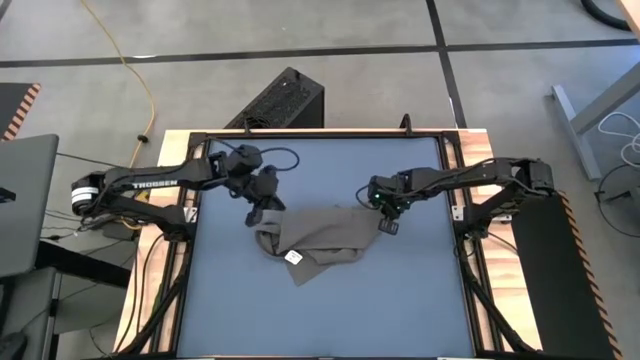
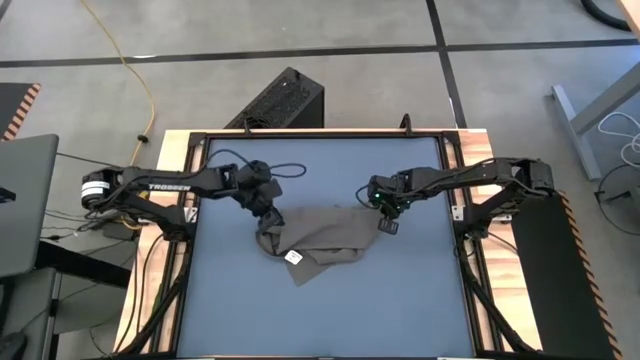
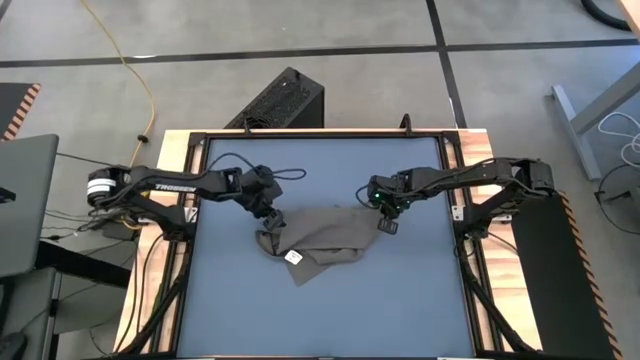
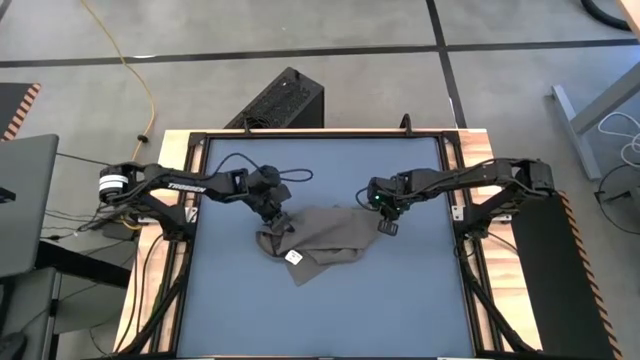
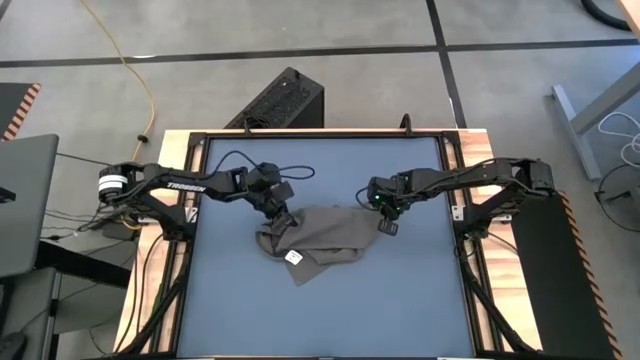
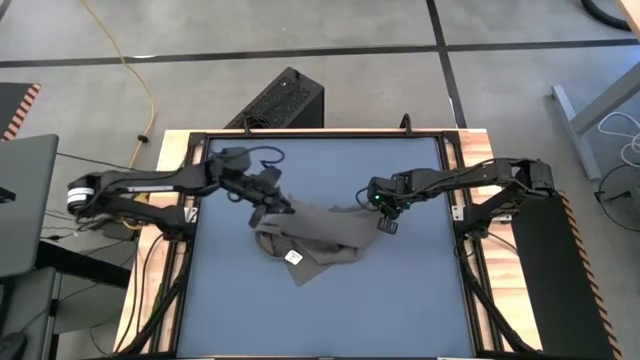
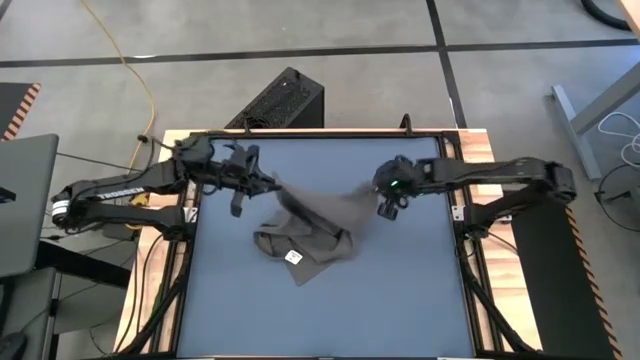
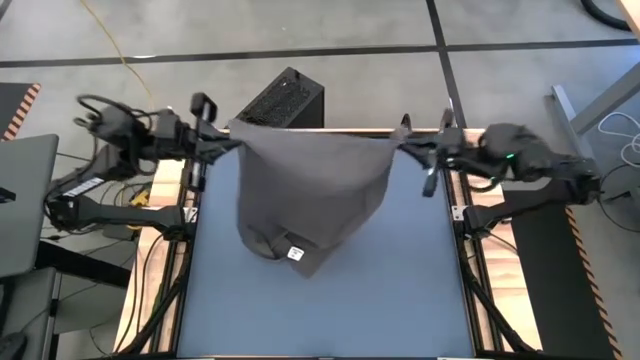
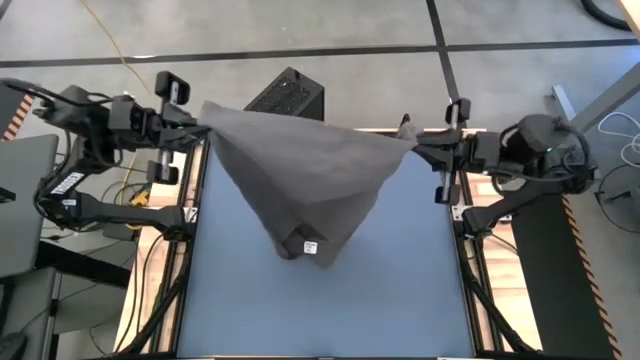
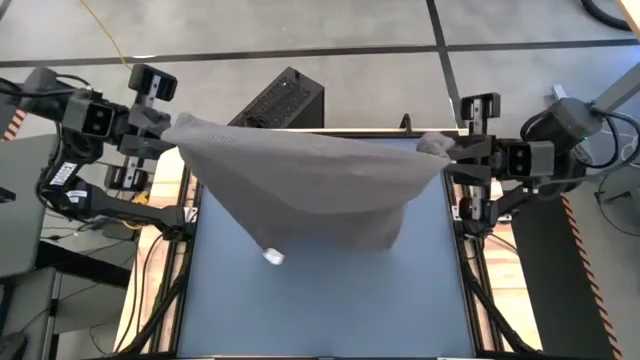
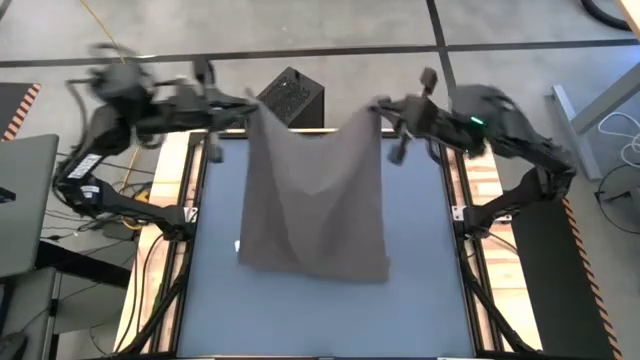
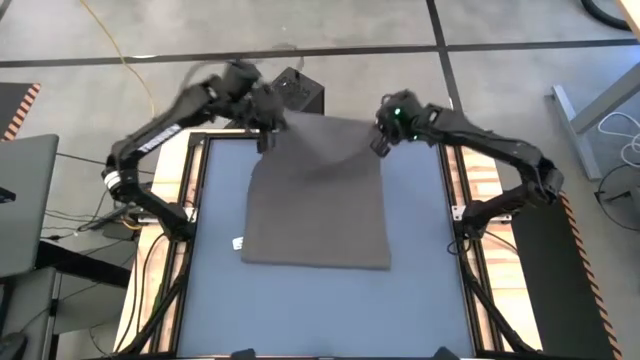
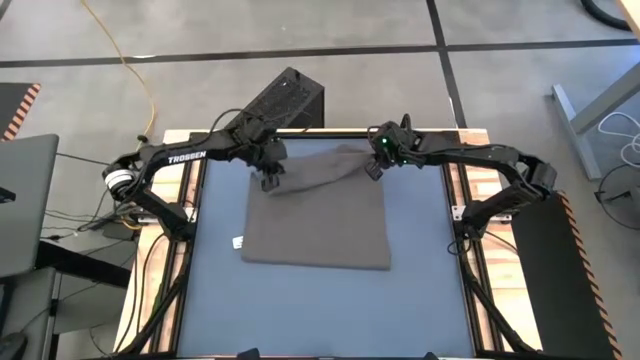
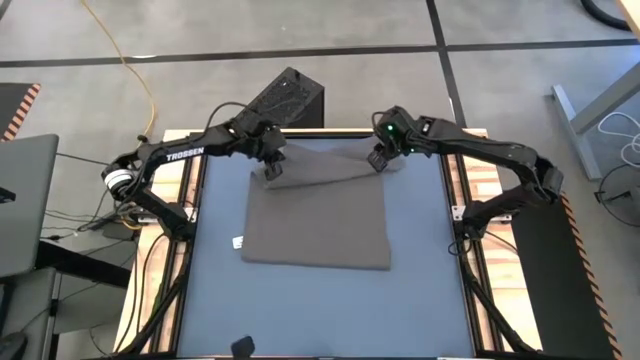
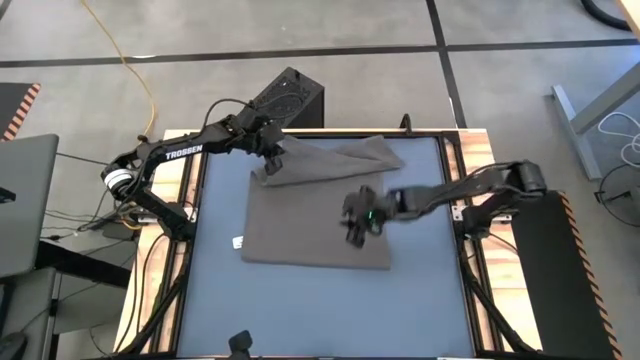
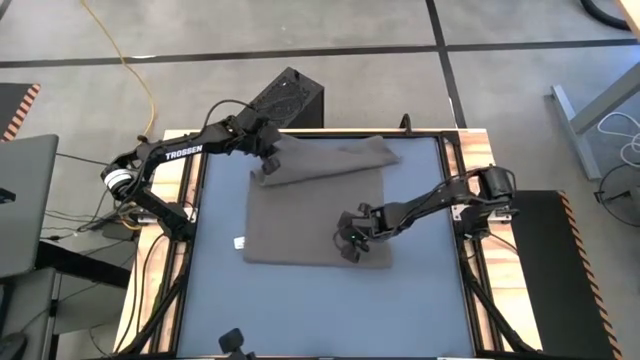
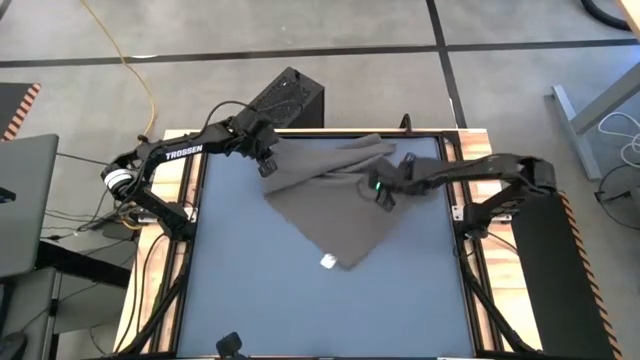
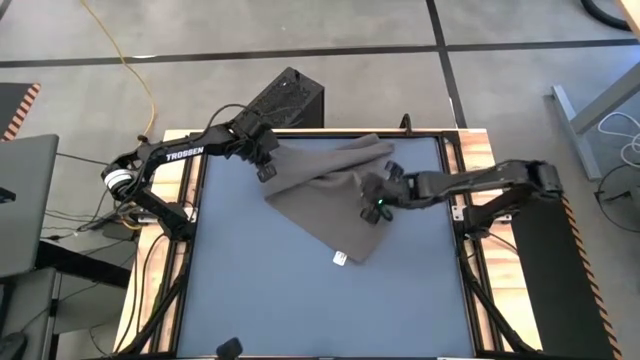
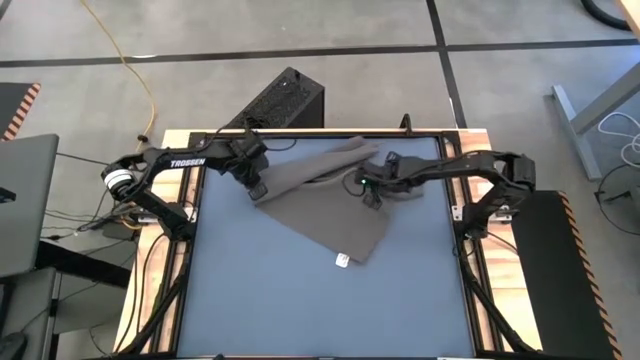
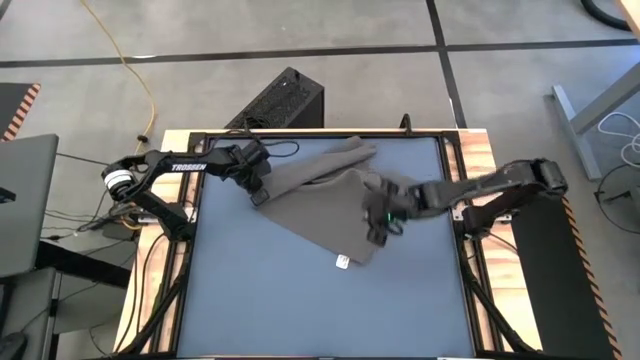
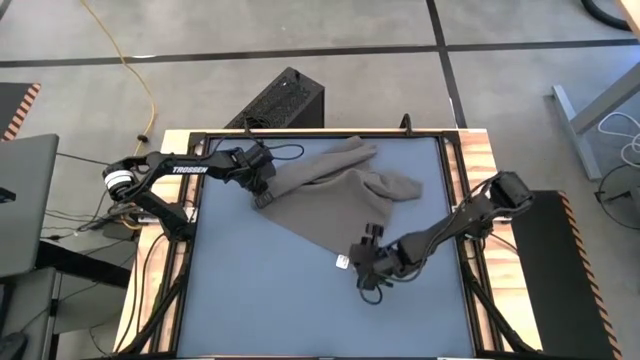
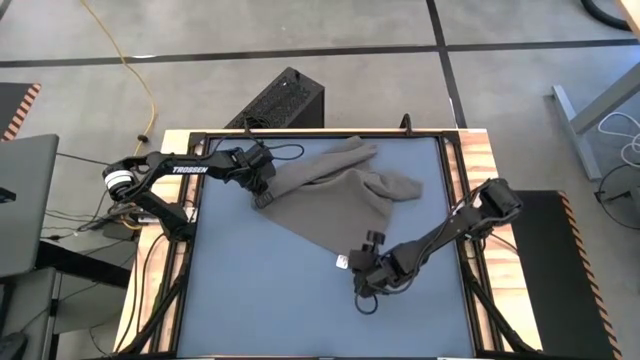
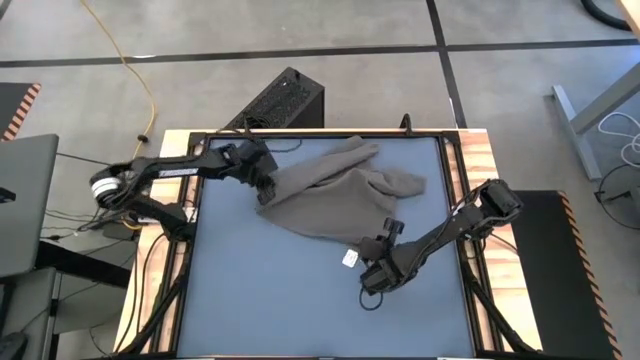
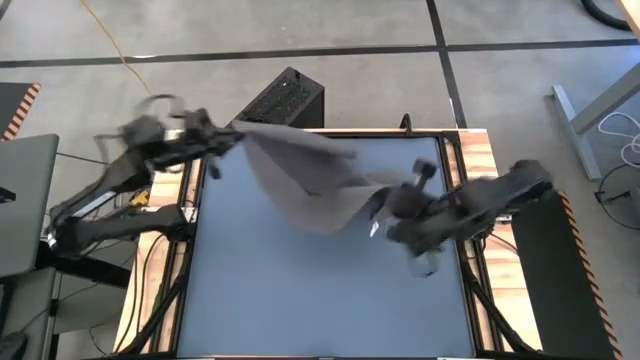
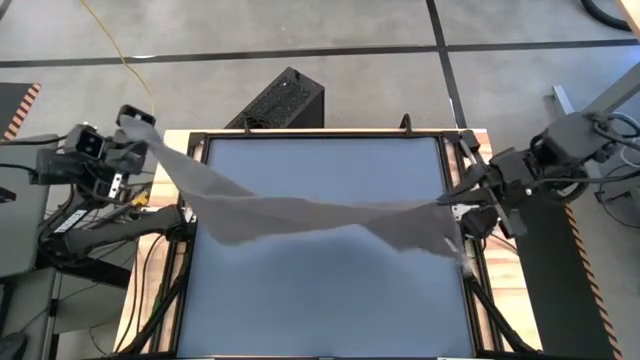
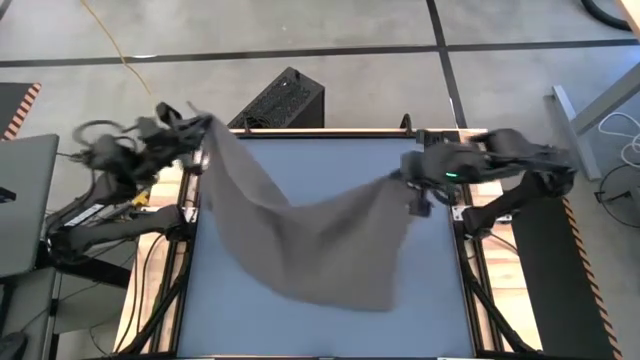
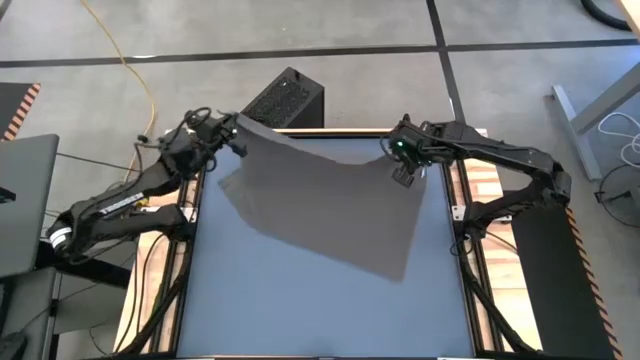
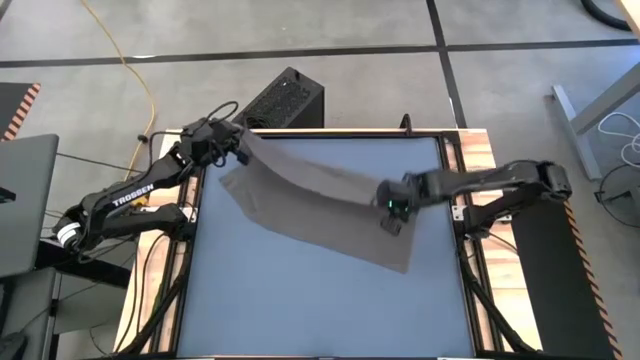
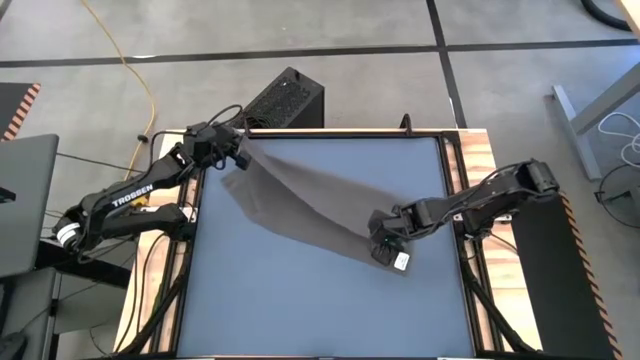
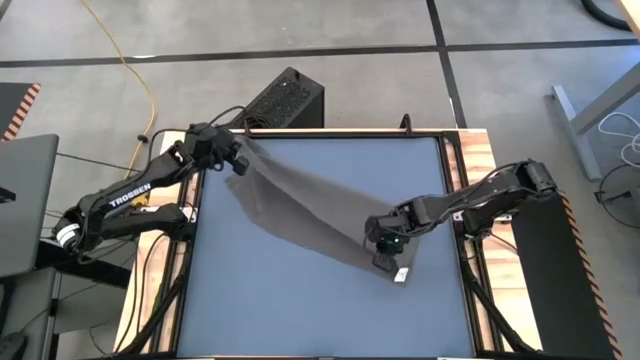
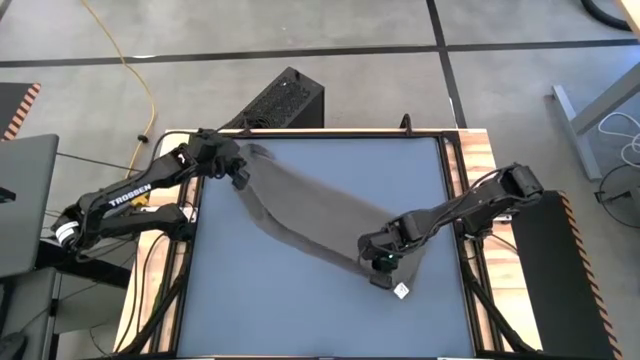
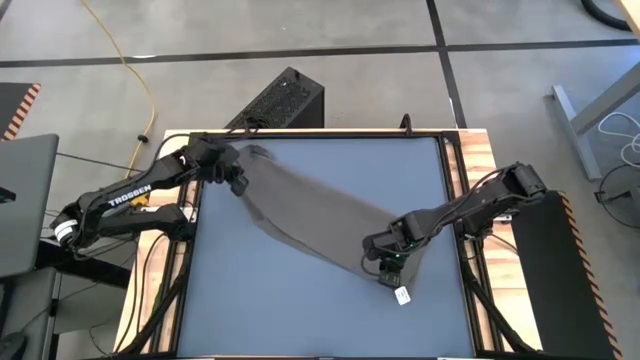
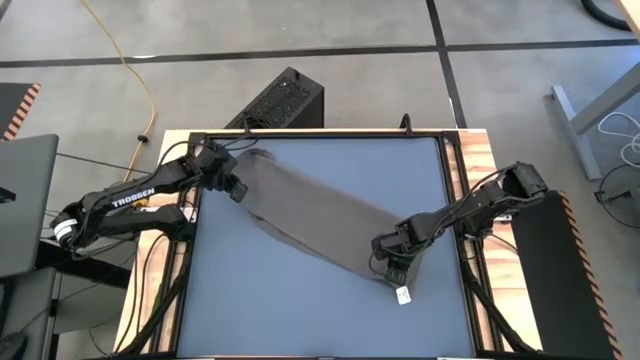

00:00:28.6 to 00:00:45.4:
Task: Roll towel into tight, uniform cylinder
Fold the gray towel

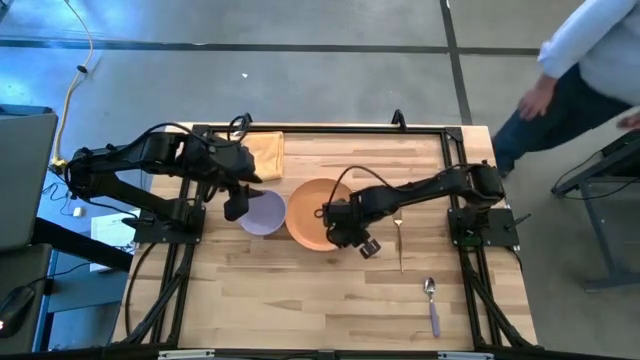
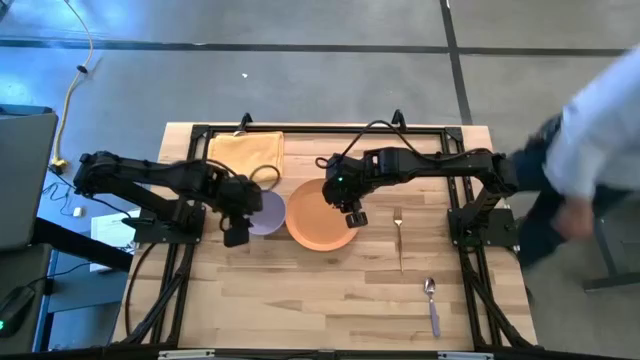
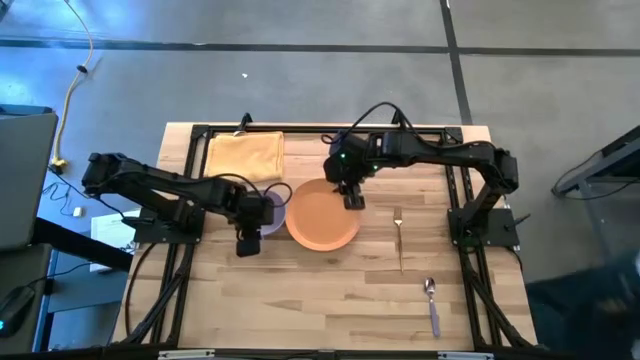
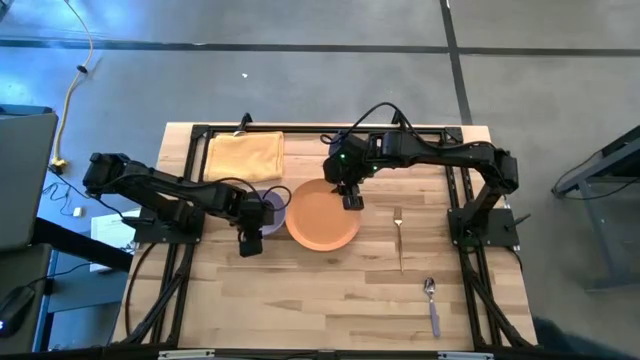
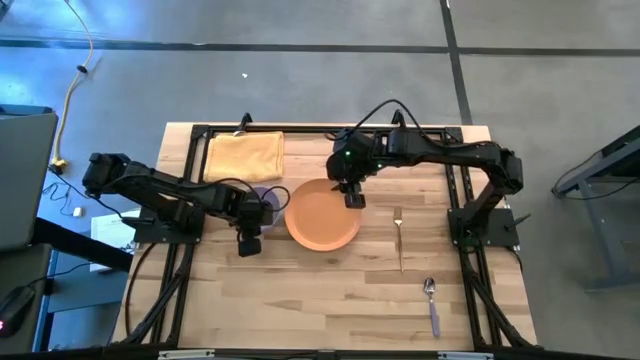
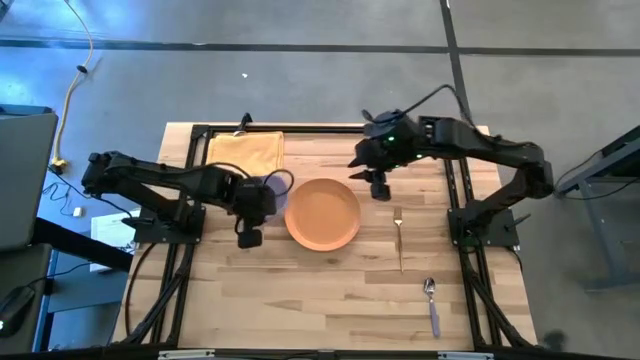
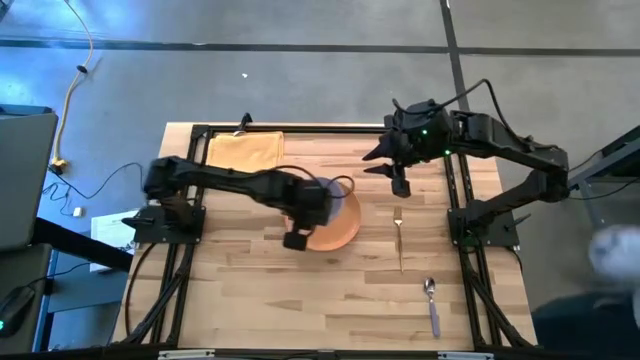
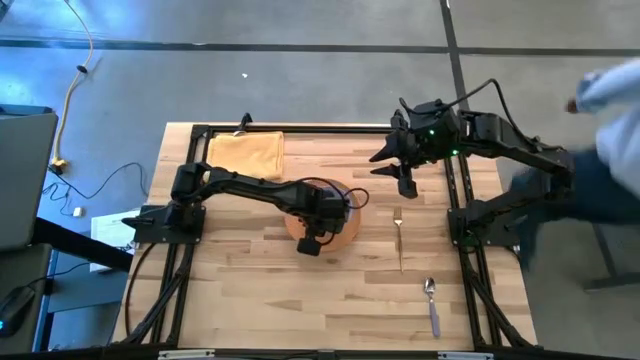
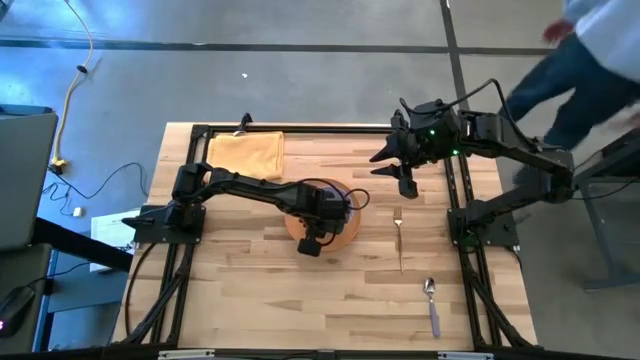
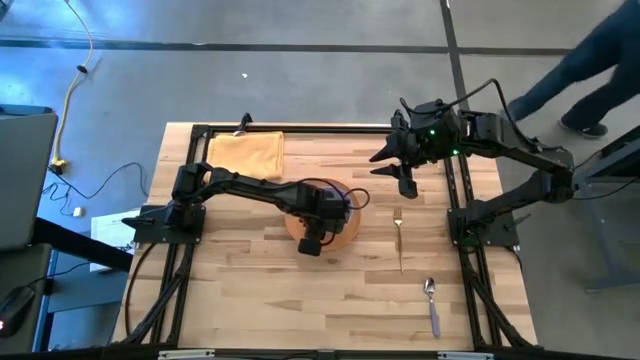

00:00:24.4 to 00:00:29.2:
Task: Set table place
Put the purple bowl on the orange plate
